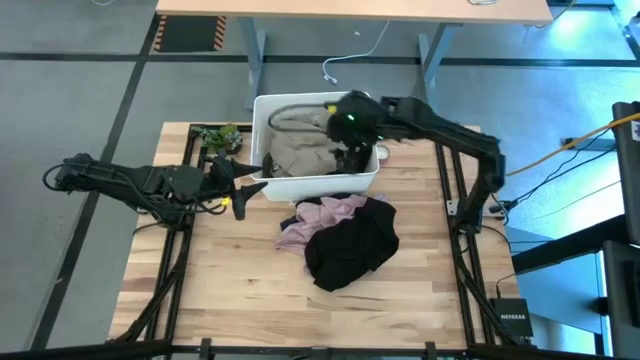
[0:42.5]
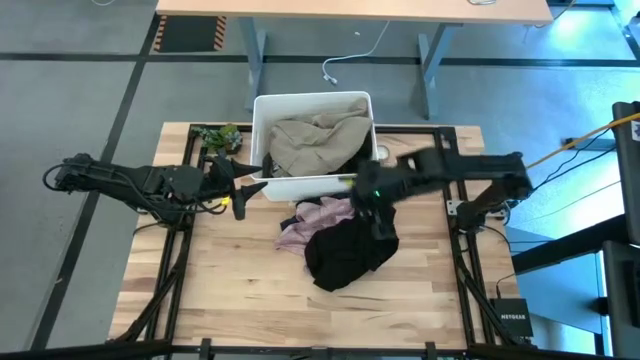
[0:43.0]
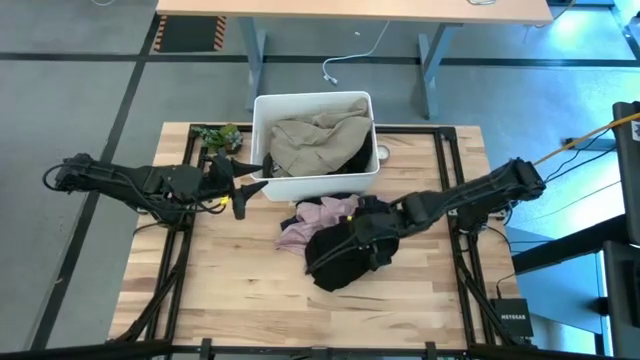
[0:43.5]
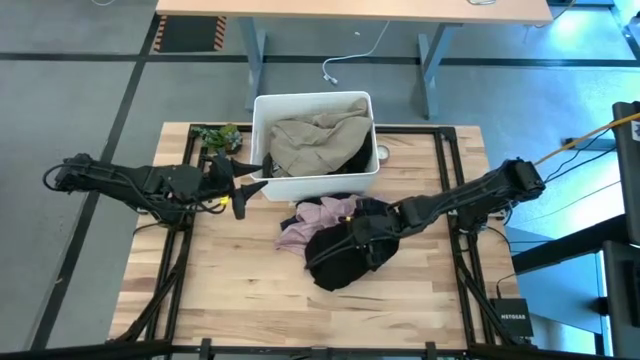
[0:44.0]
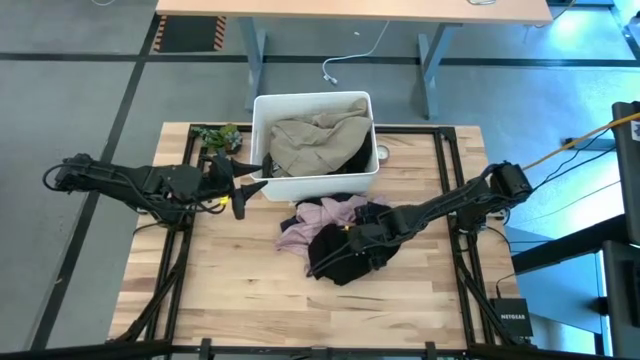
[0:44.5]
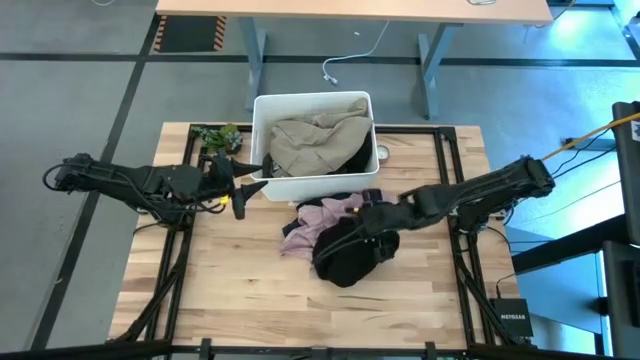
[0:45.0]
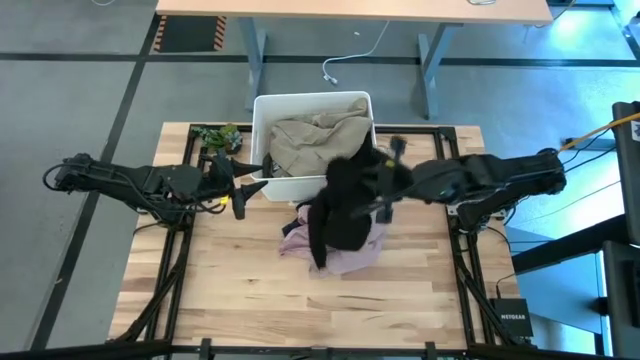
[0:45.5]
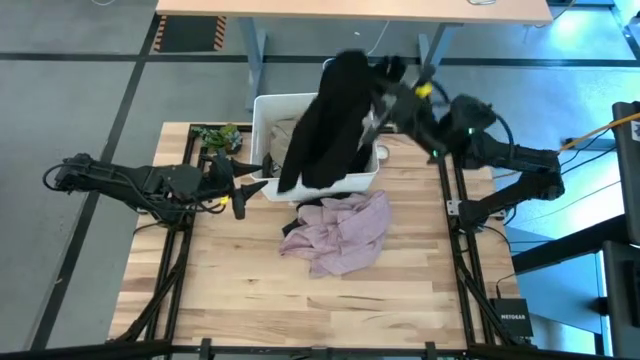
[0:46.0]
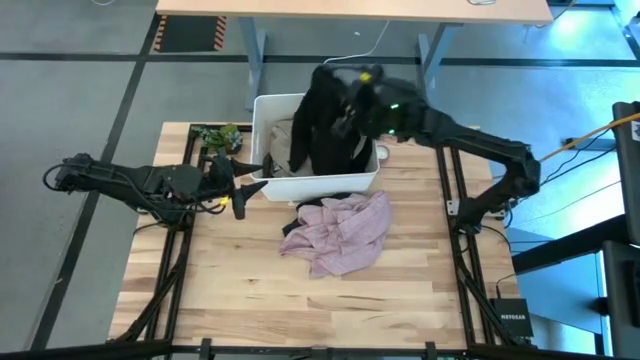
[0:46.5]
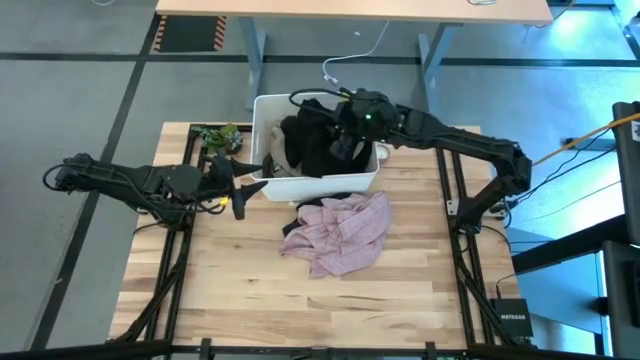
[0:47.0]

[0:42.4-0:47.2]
Task: Sort clothes
Put the black longsleeve into the white bin

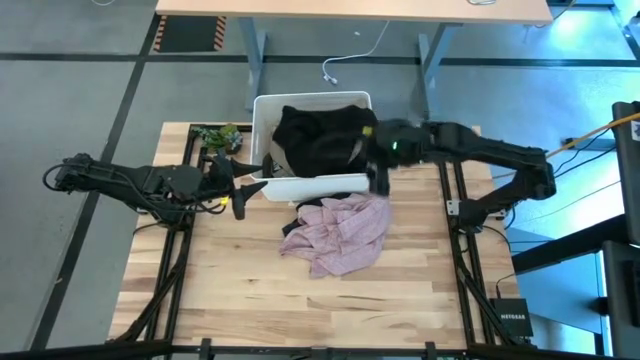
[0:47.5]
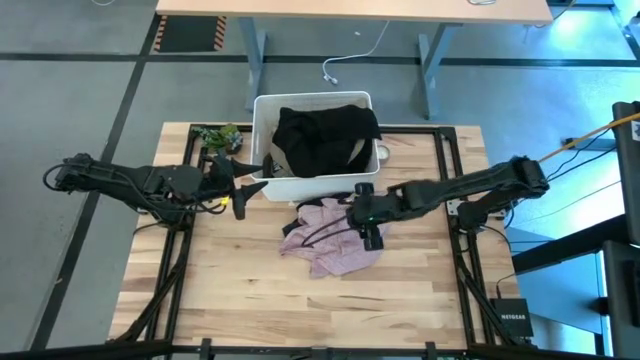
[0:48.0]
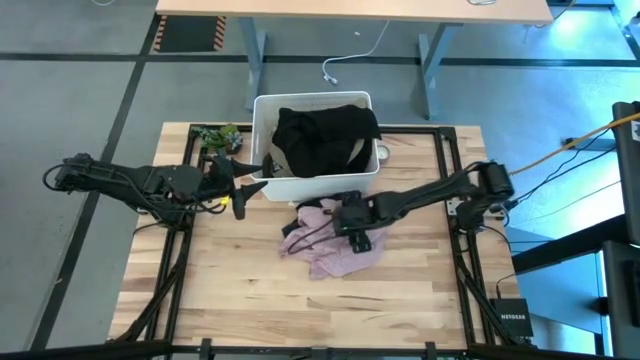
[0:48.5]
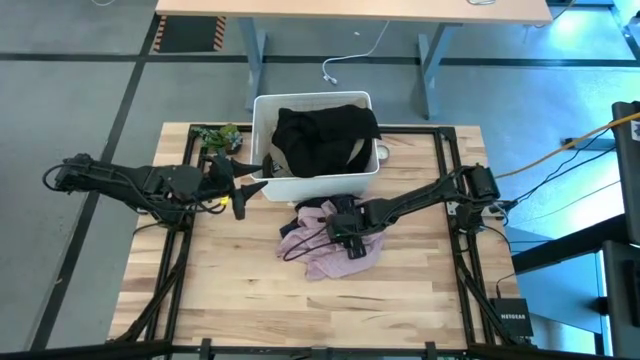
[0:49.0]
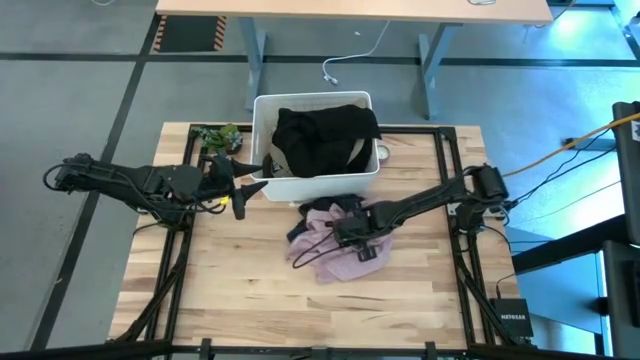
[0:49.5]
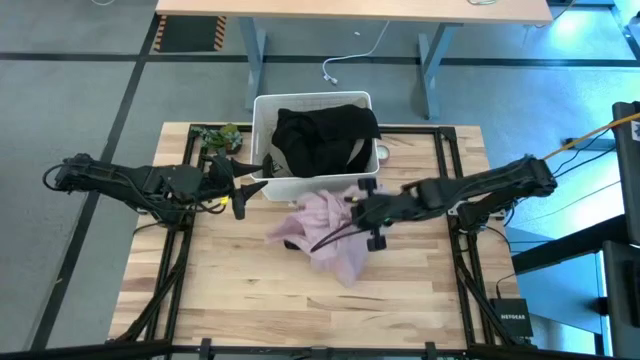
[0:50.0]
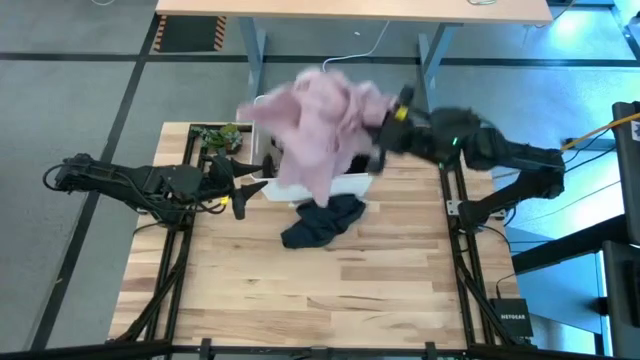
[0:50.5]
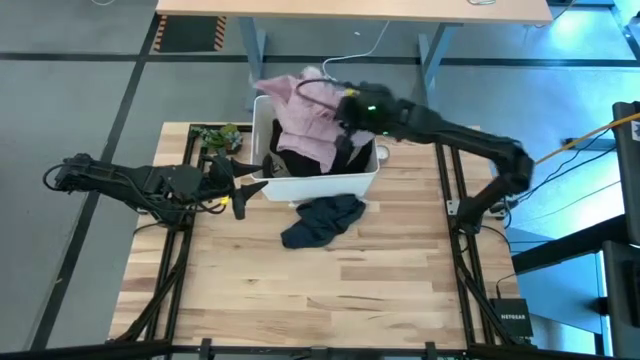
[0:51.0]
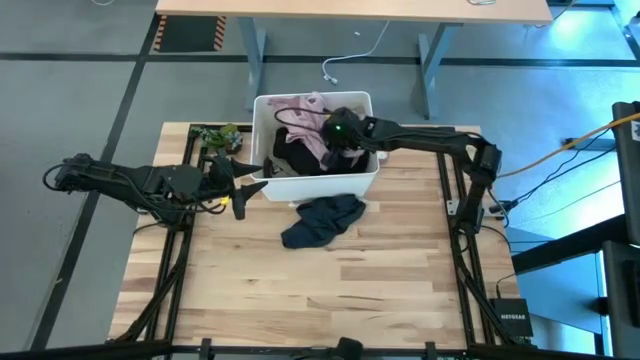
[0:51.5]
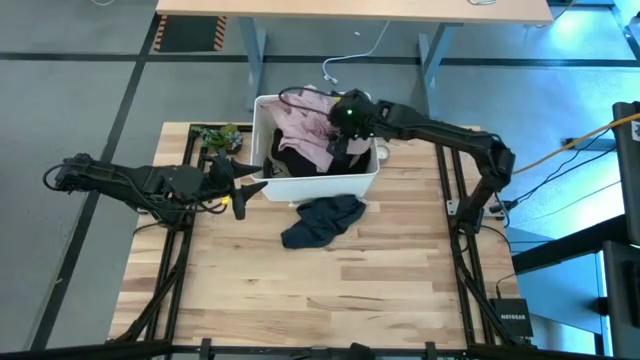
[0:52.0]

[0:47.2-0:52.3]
Put the pink shirt into the white bin

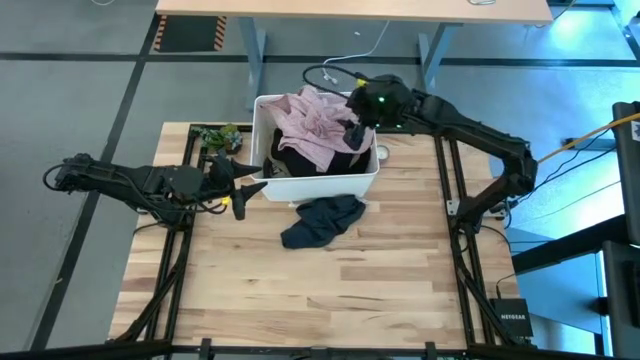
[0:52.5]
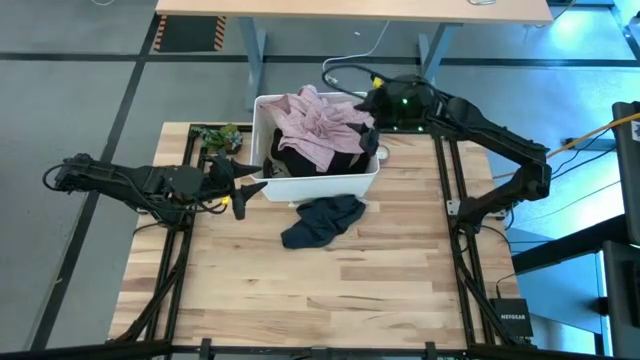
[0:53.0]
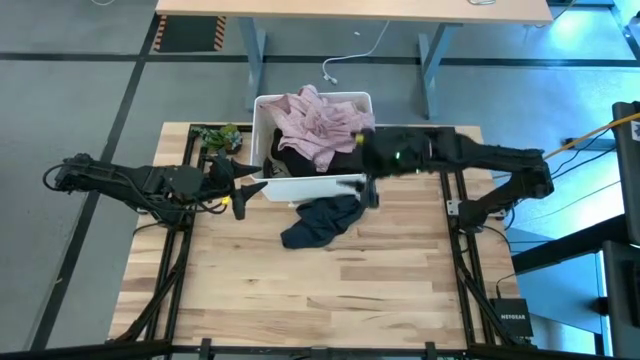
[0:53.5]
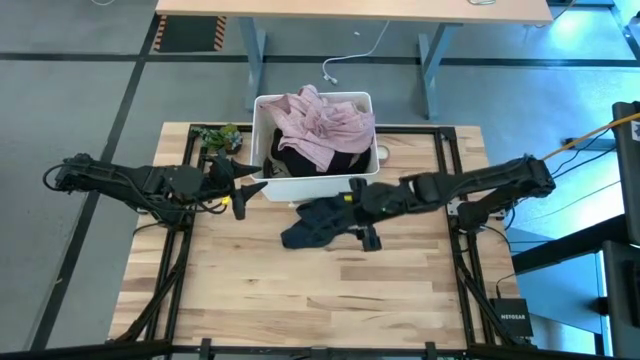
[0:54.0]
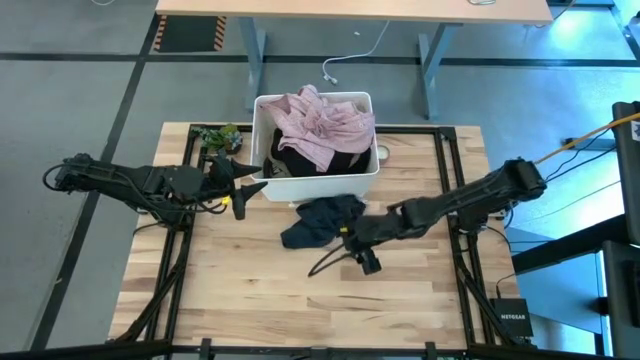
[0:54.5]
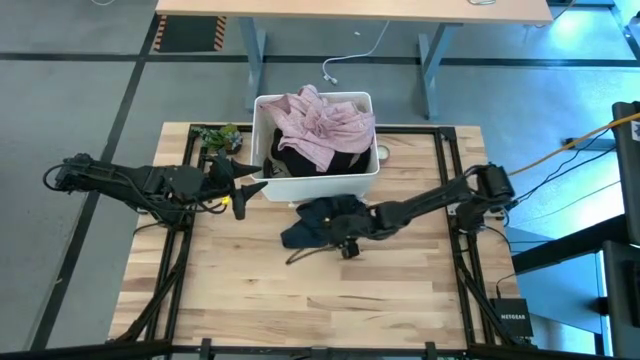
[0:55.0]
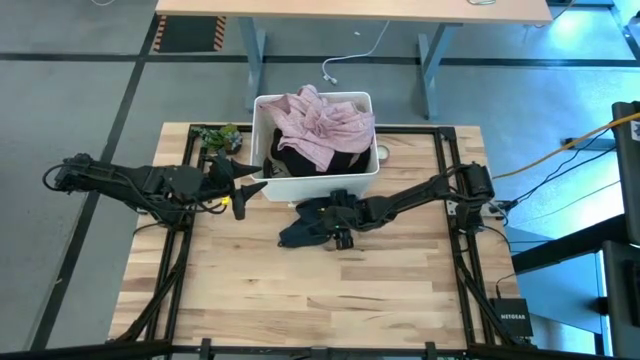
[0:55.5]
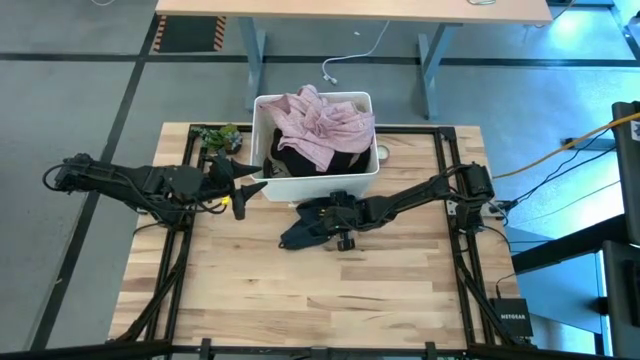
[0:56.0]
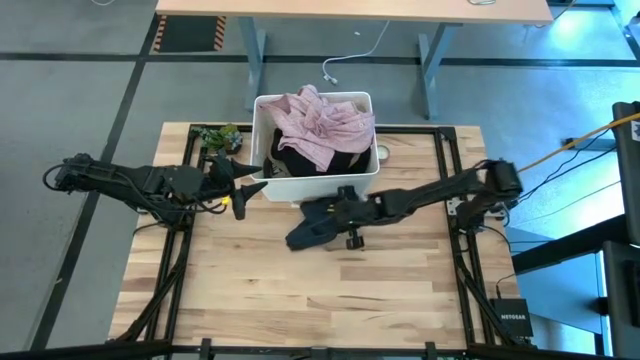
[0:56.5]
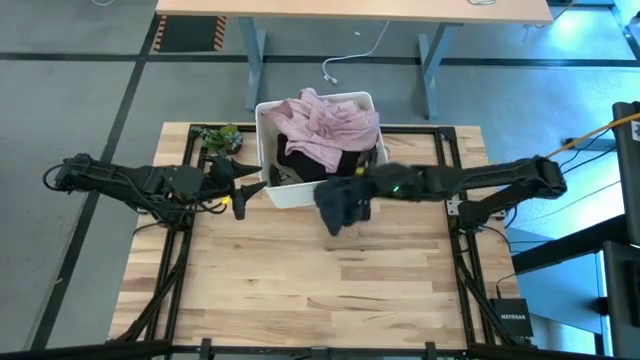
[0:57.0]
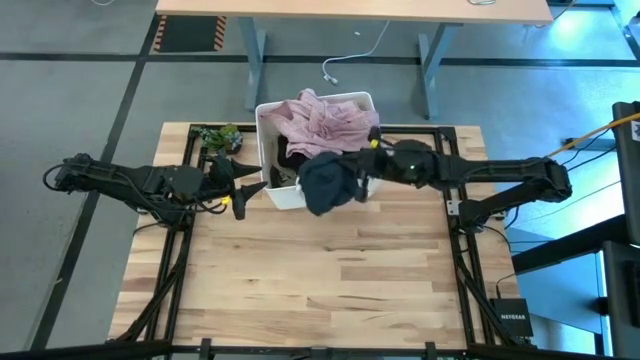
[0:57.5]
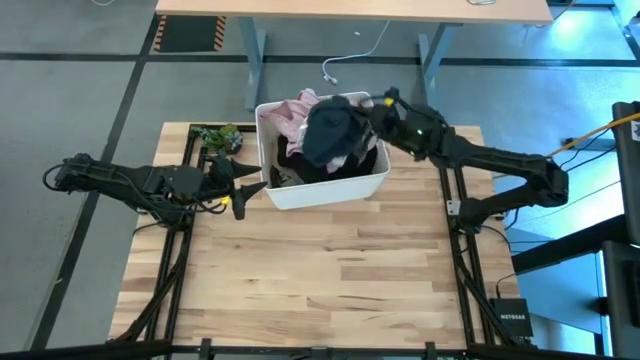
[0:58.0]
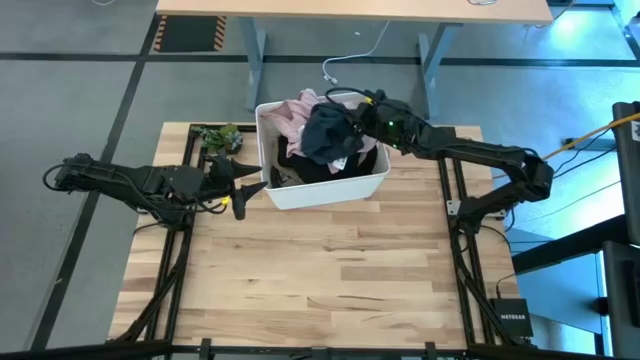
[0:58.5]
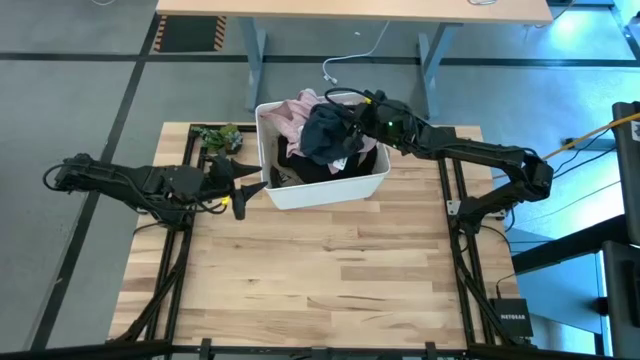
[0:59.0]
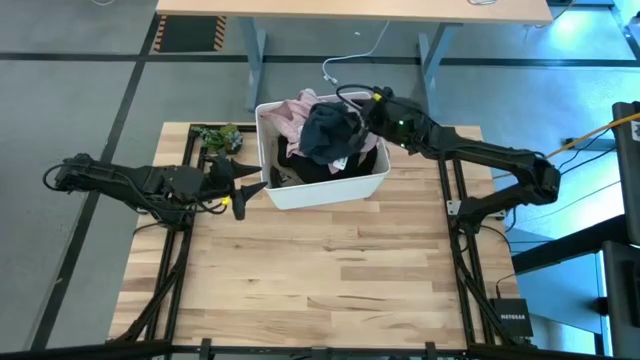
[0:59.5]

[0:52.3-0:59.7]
Put the blue shorts into the white bin

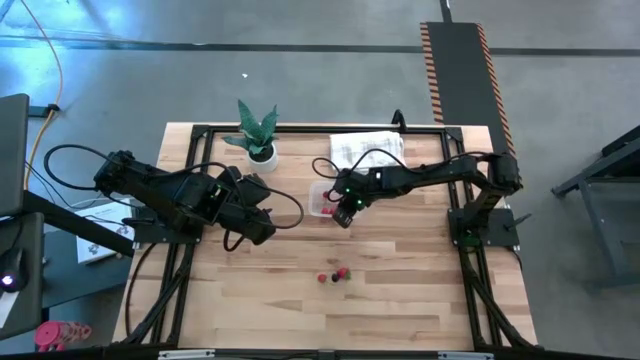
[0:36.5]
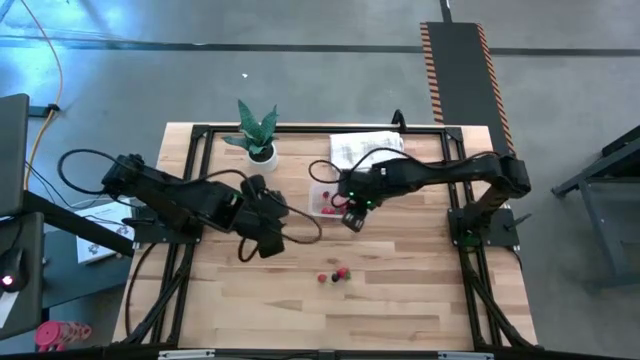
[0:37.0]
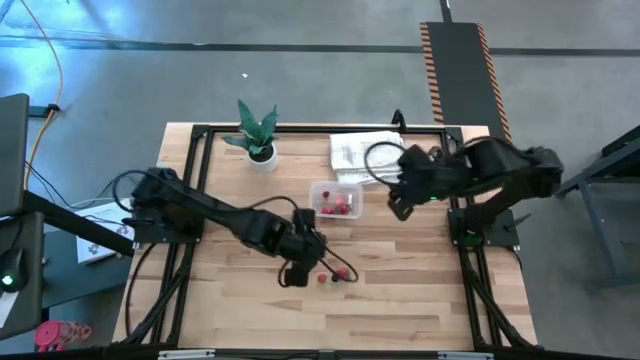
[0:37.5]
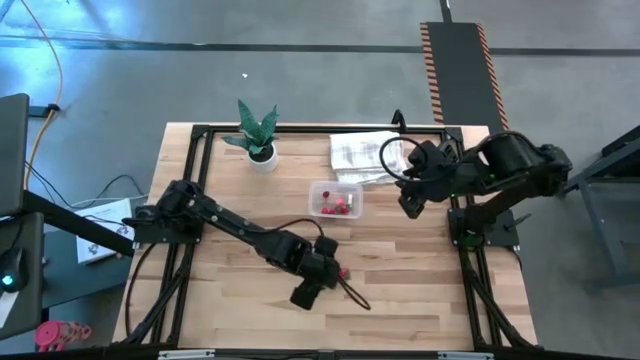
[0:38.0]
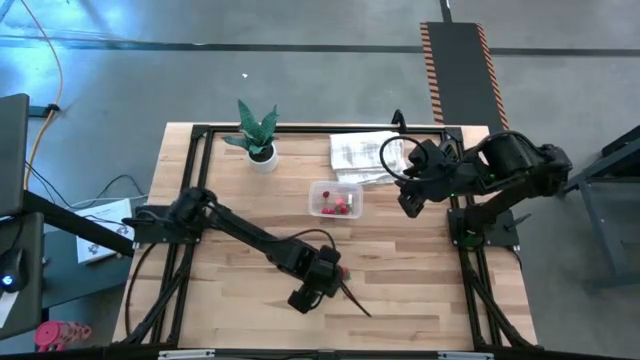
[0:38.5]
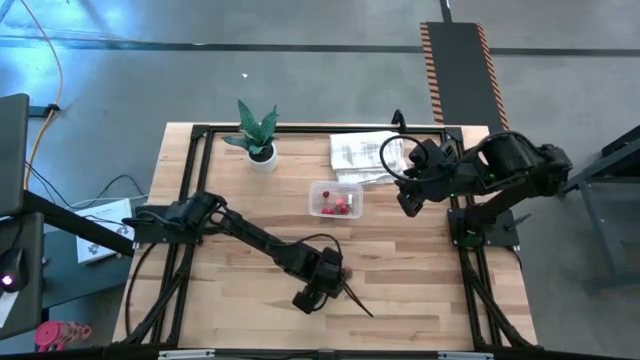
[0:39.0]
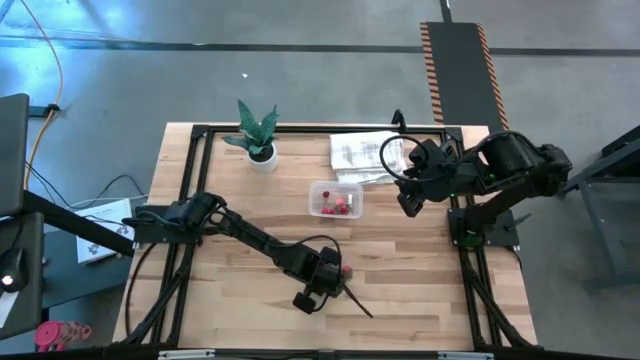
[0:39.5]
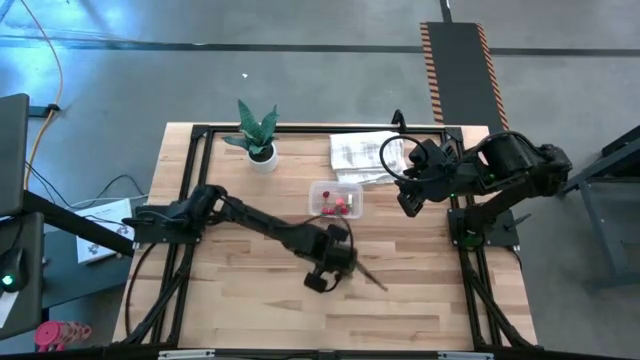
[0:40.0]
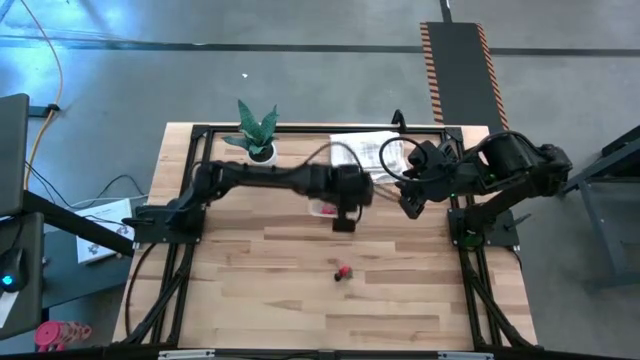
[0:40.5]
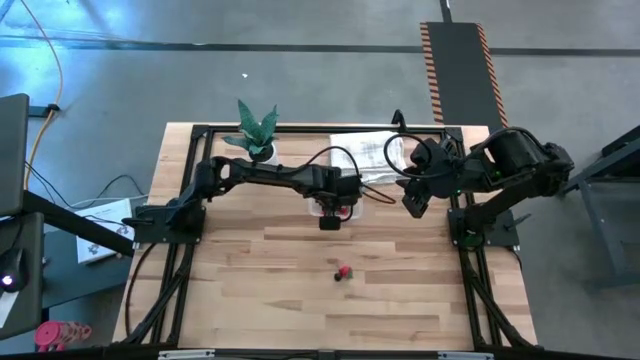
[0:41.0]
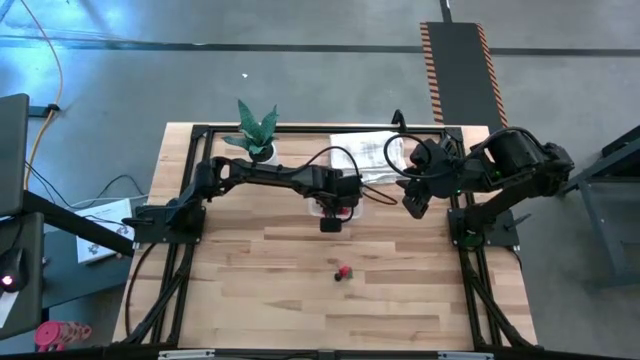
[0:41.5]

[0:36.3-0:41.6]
Task: Pick and placing Produce into tupperware
Put the strawberry into the transparent bin
